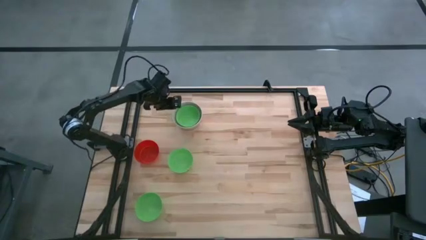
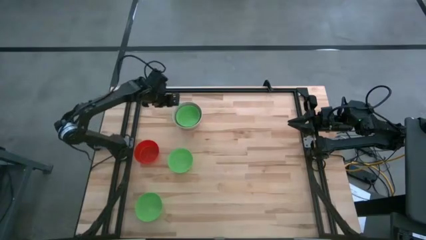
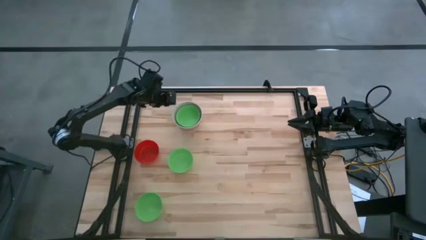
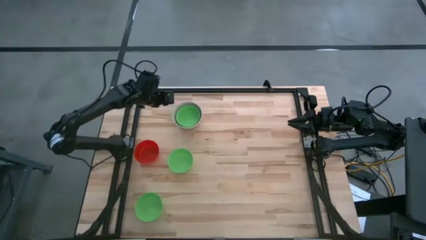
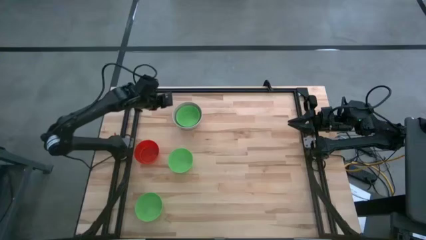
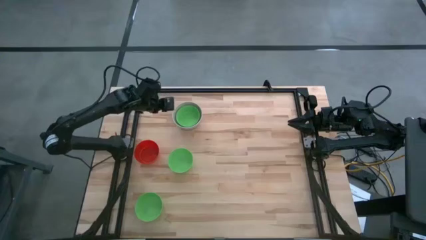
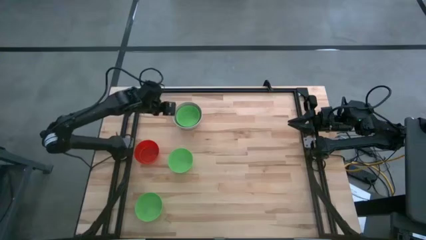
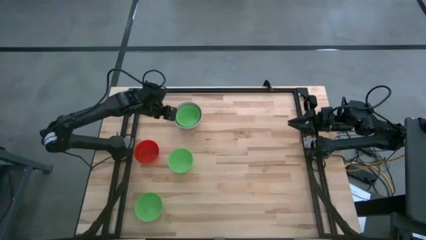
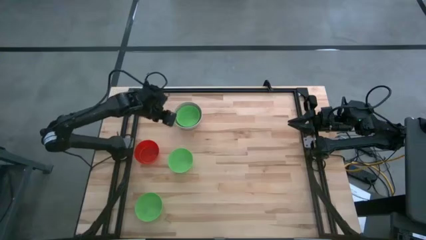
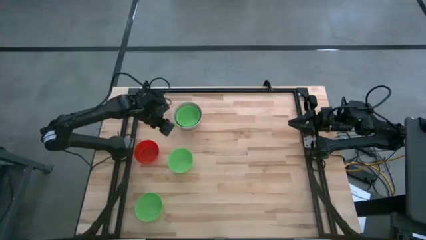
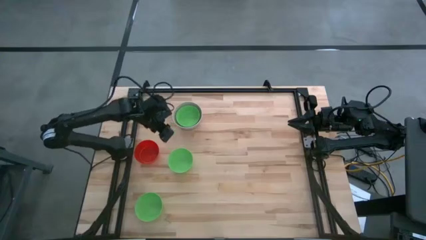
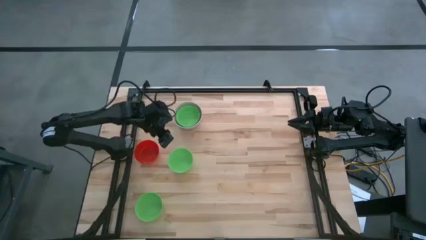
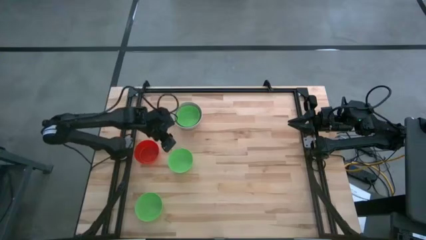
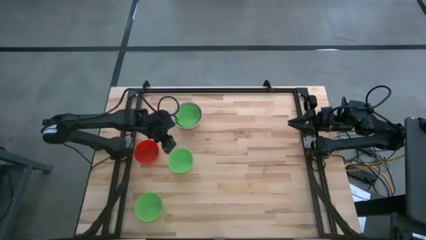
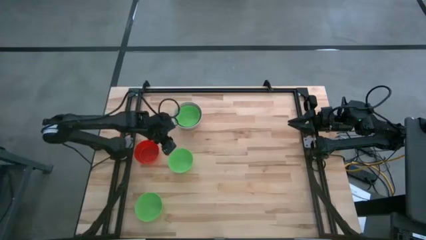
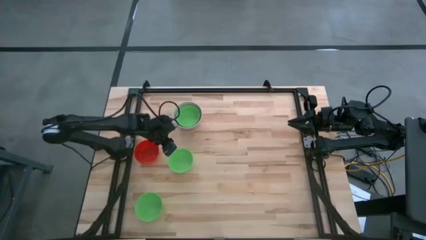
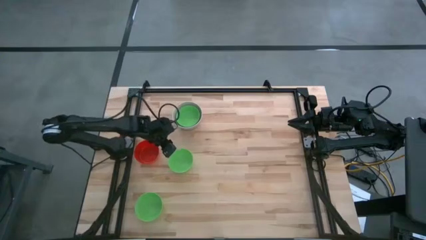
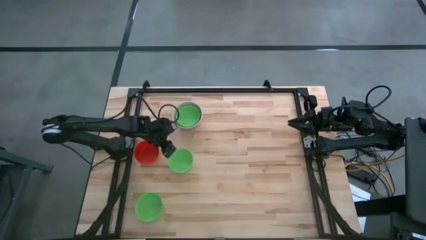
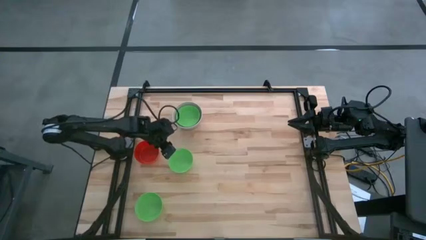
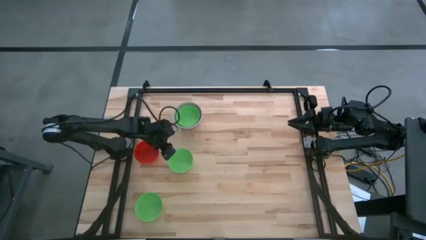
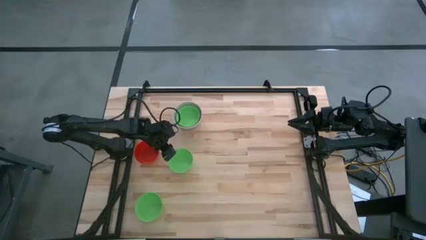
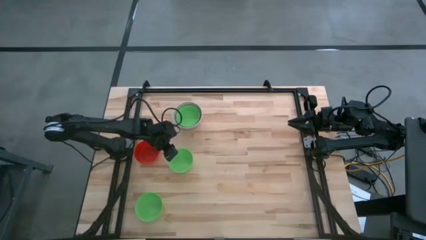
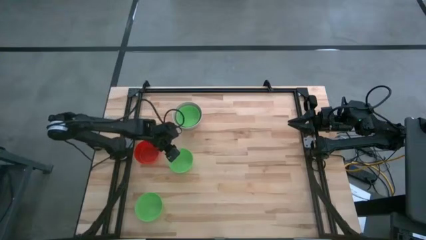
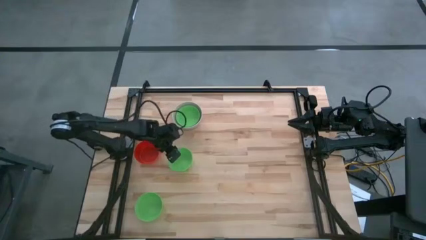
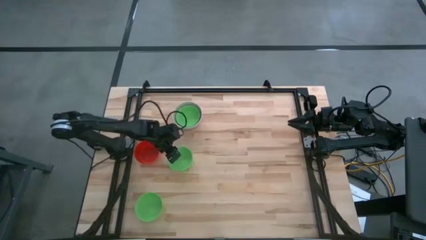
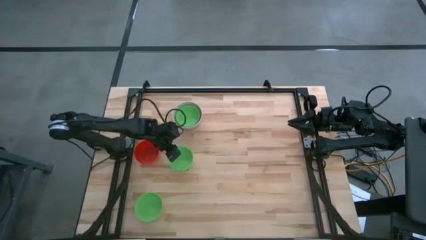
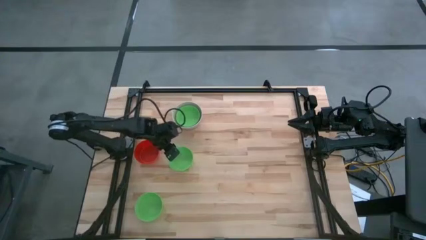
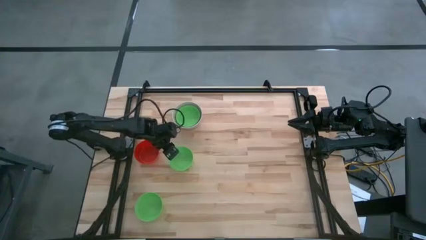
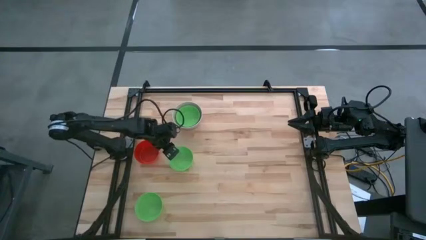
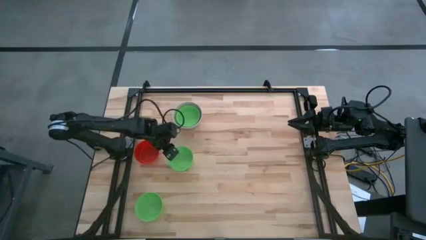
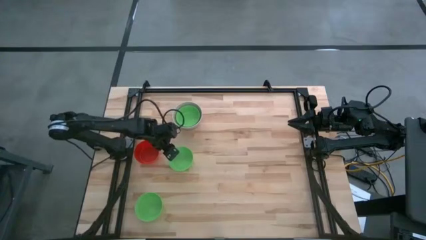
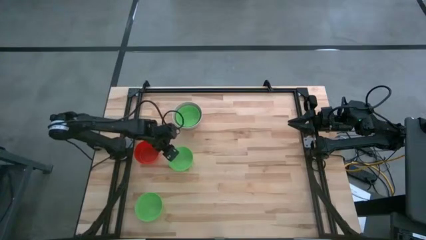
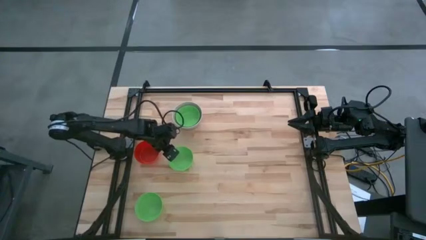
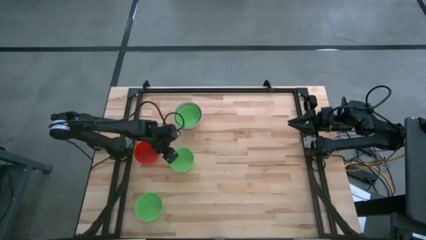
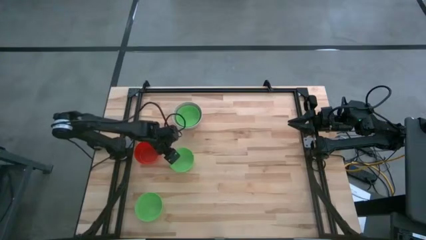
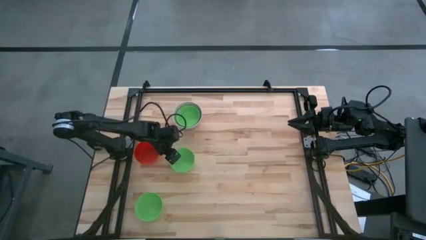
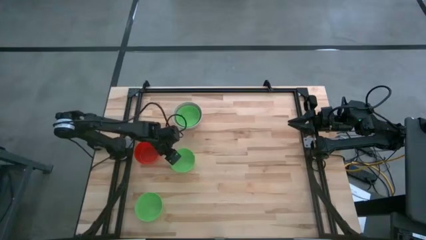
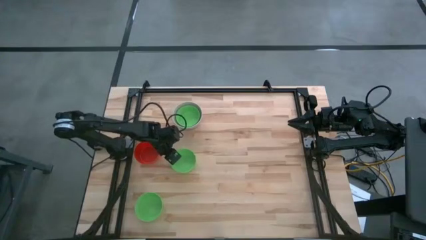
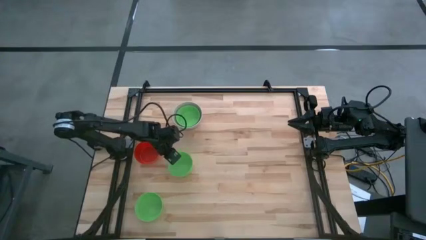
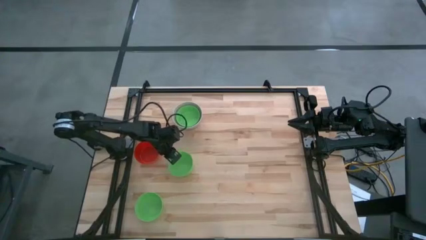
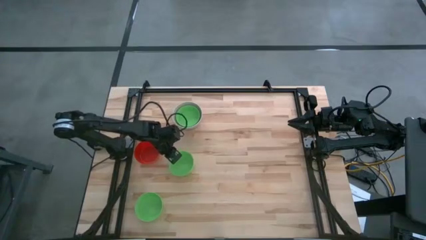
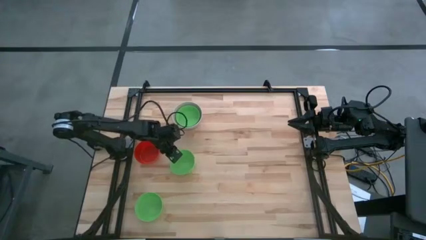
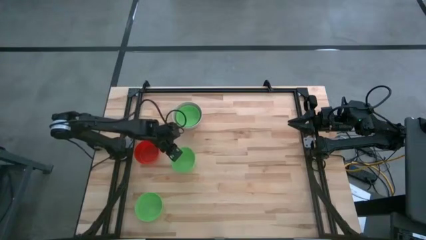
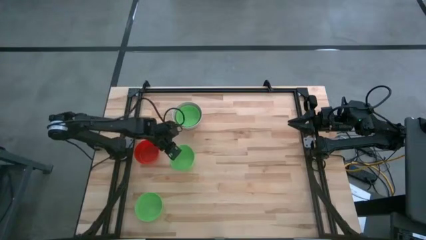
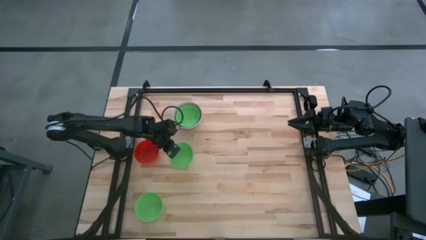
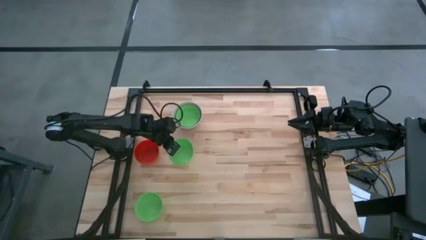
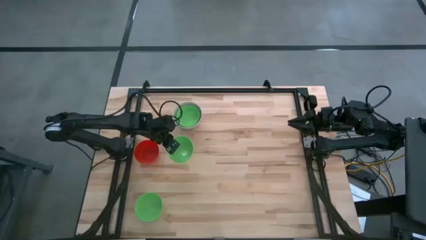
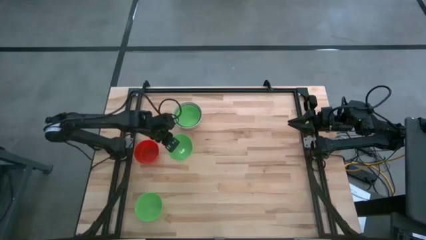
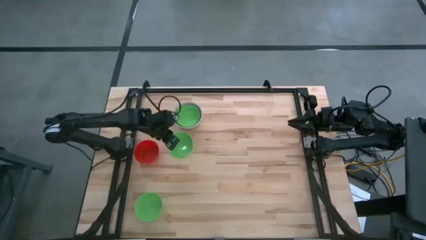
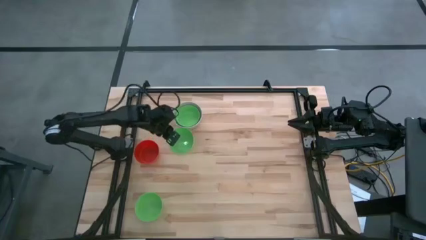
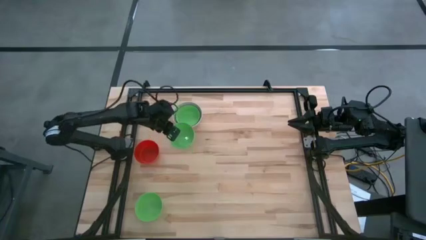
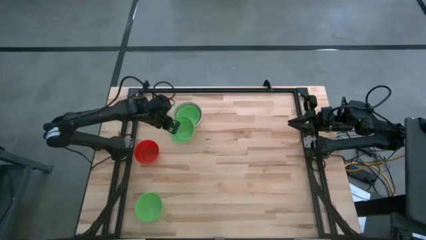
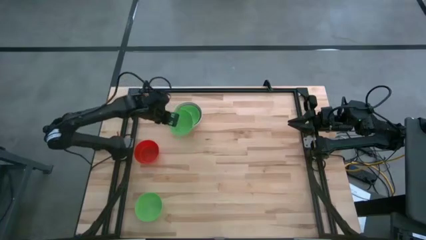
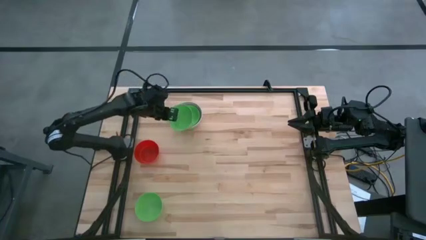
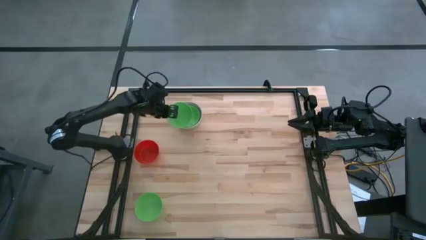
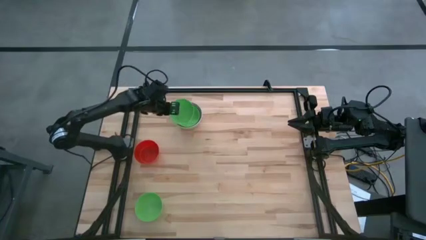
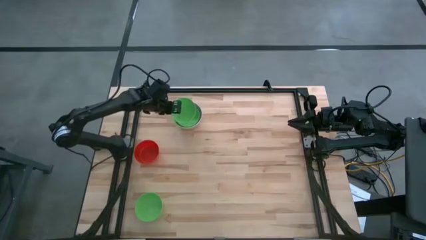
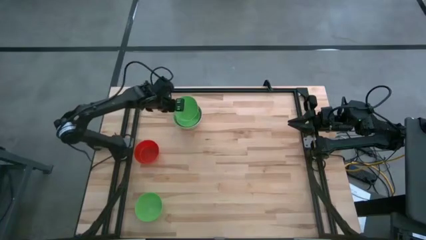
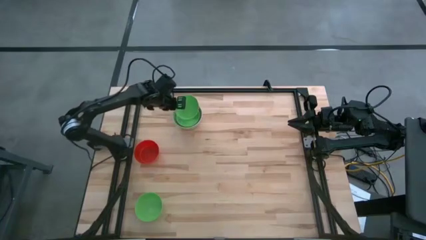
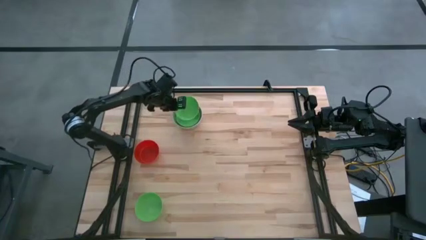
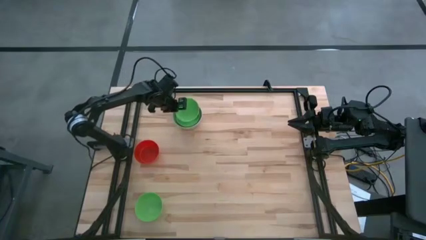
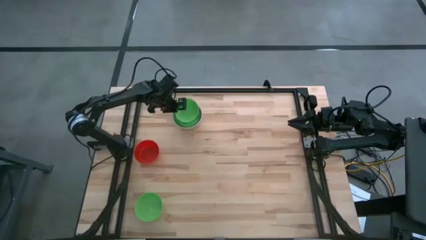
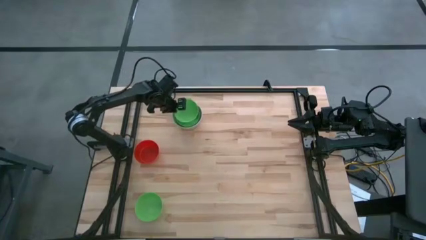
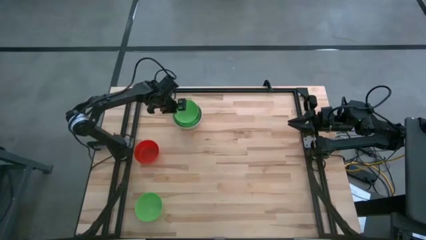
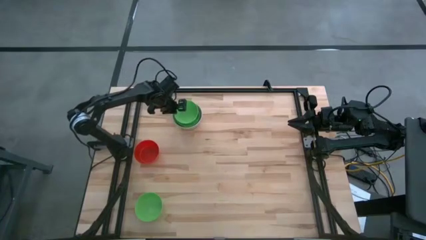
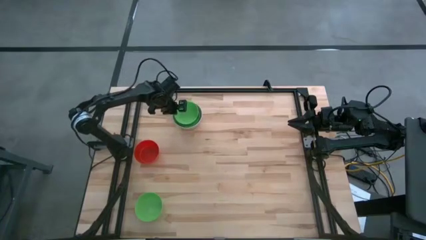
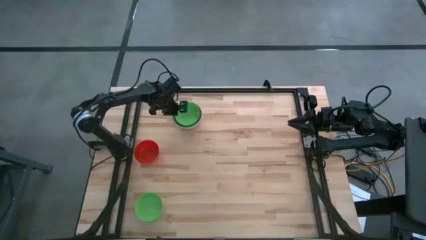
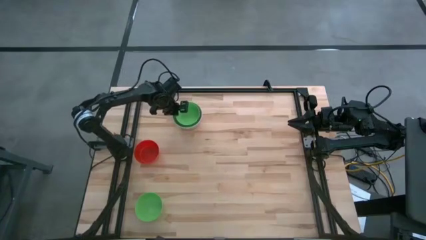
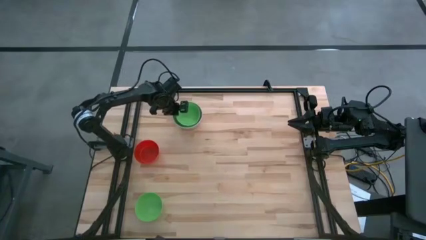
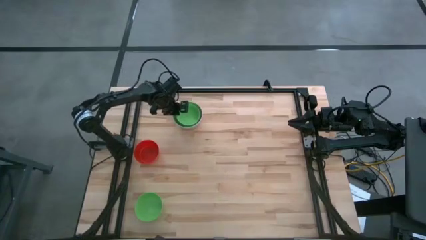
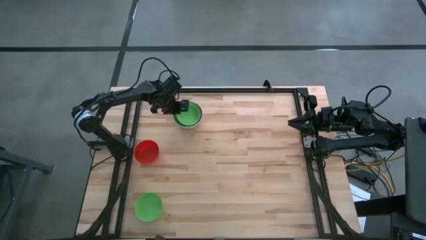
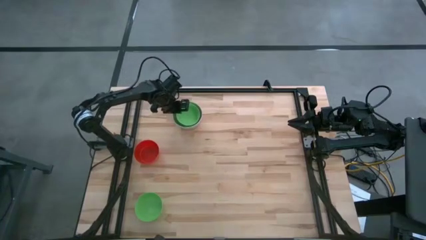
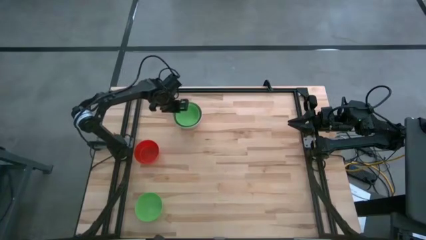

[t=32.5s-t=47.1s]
Stack the middle green bowl on the top green bowl
